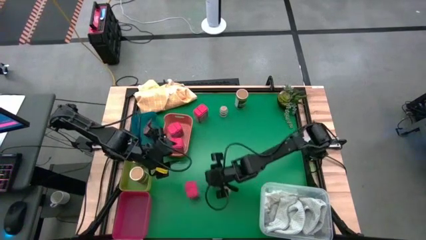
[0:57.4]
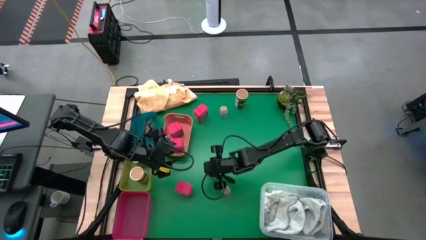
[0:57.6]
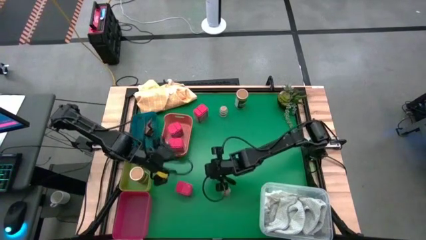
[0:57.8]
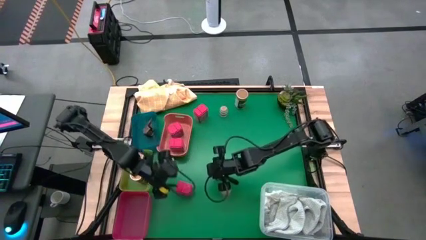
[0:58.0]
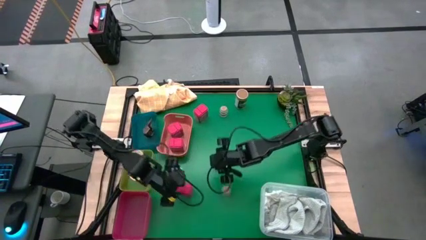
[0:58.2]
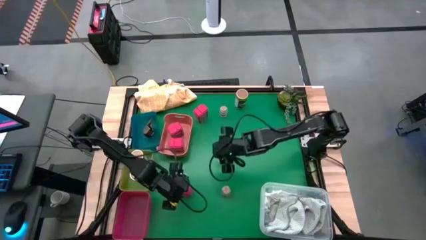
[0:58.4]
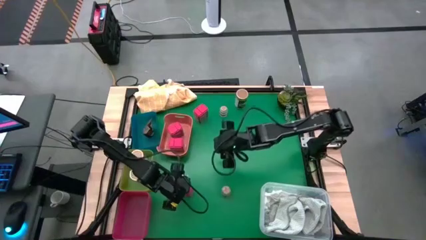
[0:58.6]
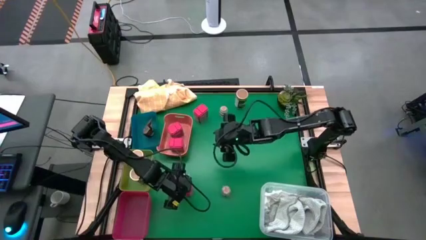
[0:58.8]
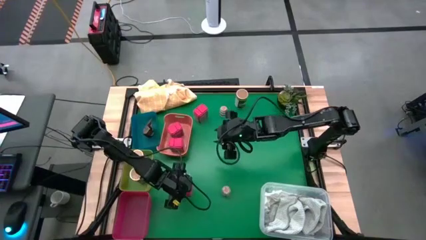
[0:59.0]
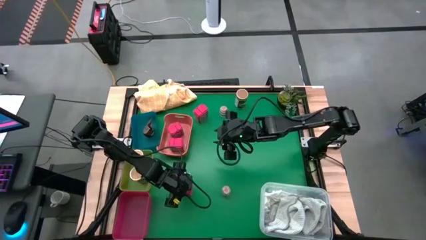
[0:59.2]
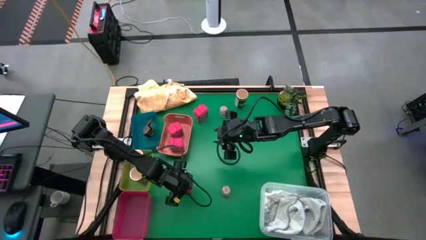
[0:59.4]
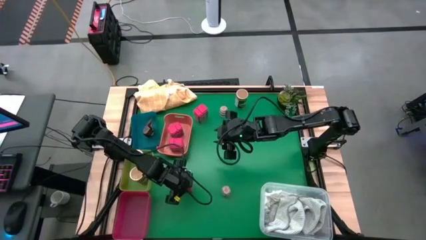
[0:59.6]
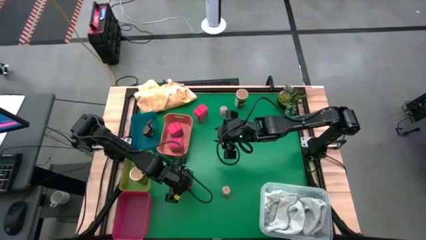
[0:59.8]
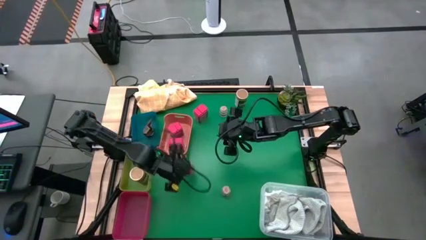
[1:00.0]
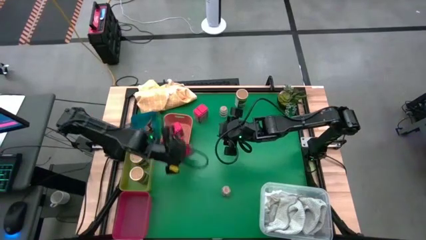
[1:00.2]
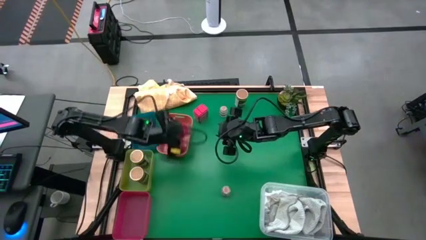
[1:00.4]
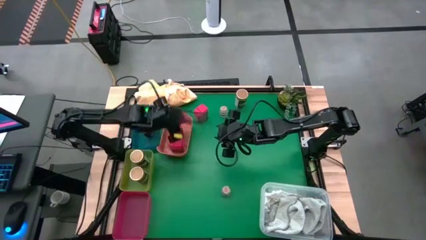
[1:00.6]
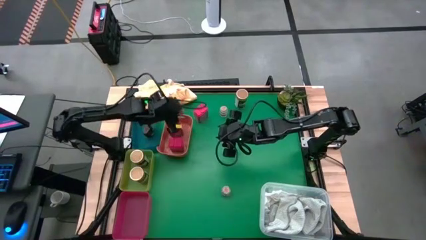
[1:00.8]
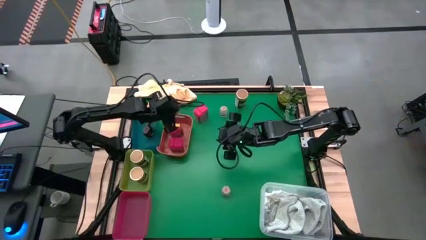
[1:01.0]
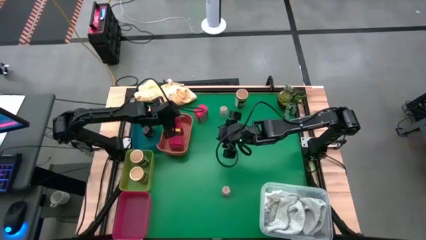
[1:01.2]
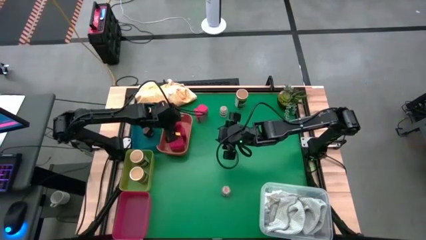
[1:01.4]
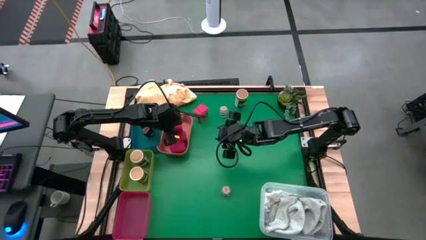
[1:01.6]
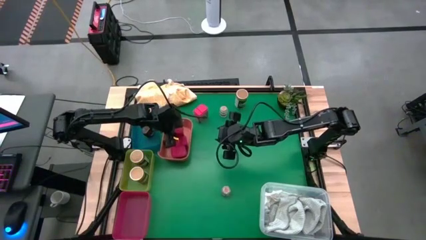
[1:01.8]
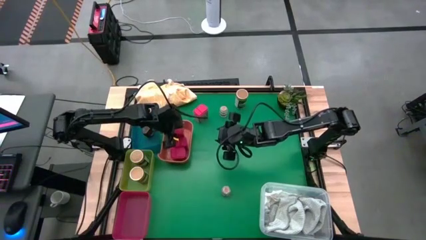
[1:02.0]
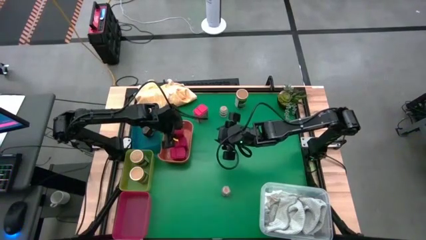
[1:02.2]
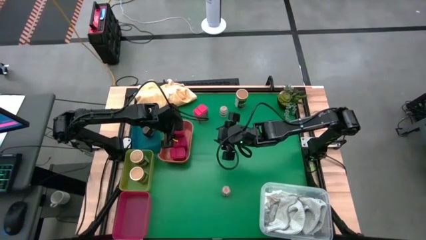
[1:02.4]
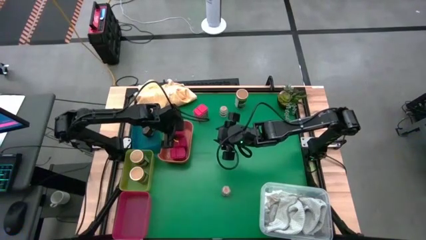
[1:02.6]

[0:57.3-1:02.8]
Task: Sort spices by type
Put the bottom red seasoning can into the orange bin

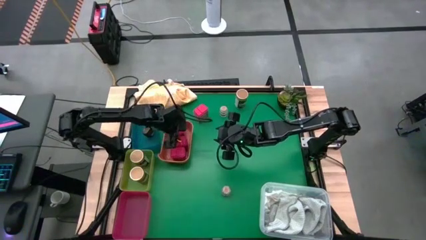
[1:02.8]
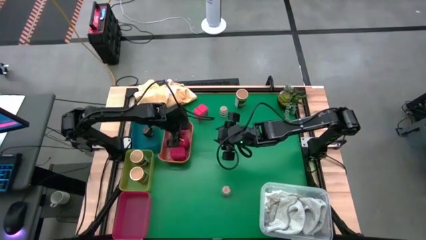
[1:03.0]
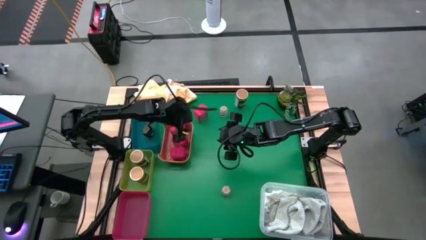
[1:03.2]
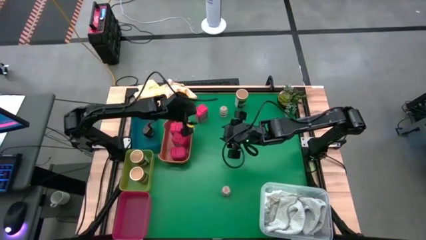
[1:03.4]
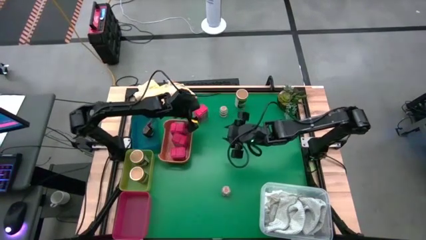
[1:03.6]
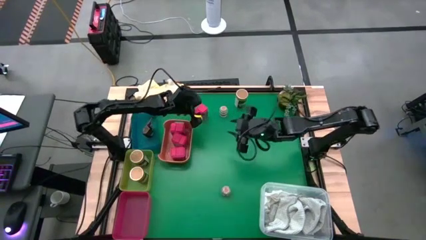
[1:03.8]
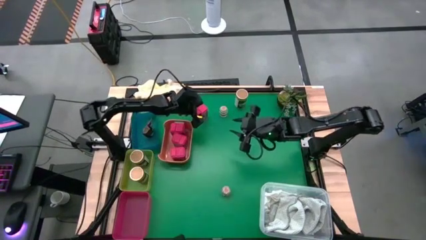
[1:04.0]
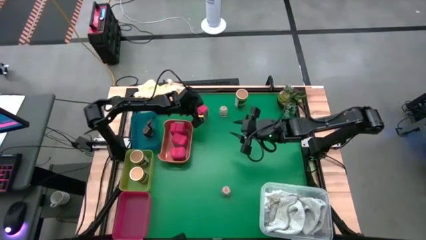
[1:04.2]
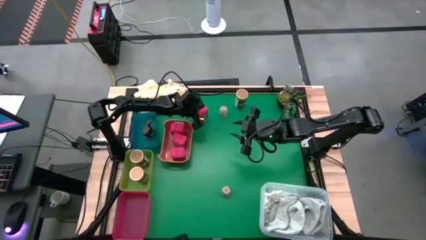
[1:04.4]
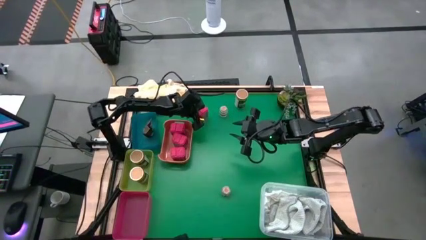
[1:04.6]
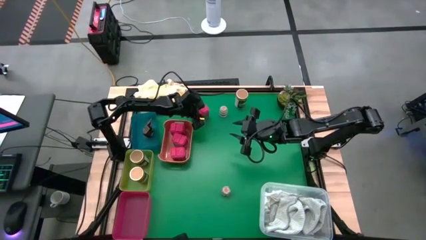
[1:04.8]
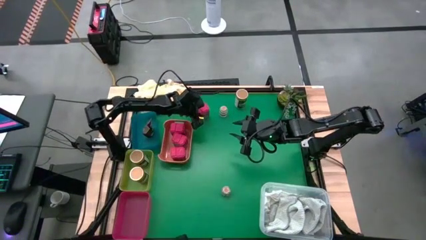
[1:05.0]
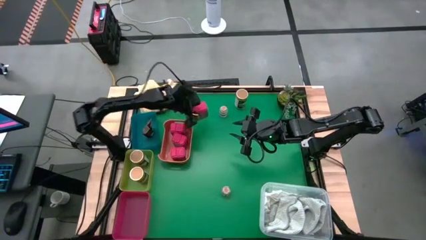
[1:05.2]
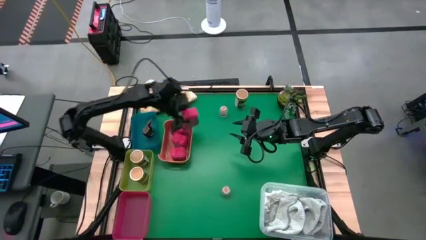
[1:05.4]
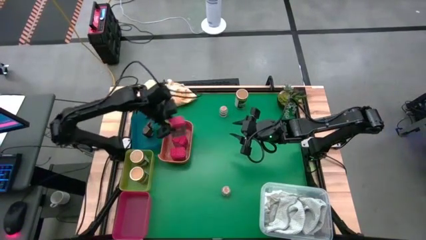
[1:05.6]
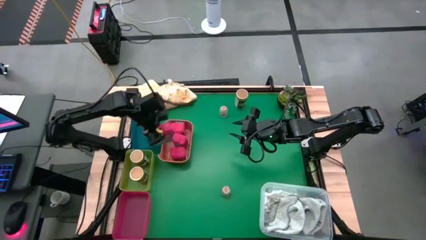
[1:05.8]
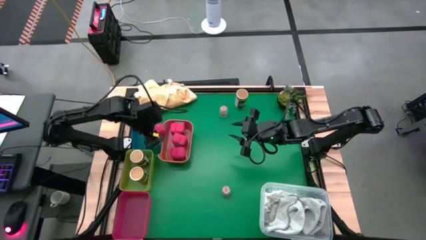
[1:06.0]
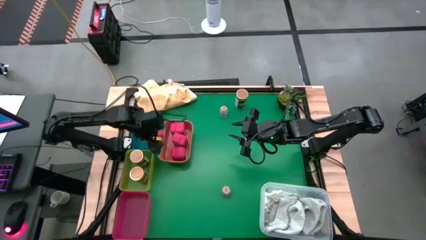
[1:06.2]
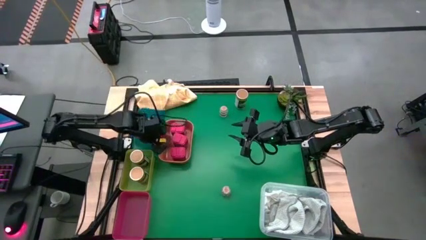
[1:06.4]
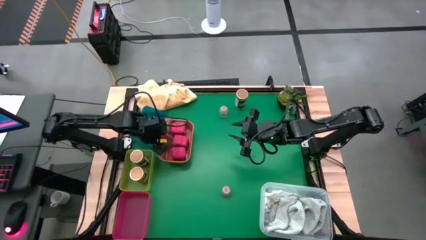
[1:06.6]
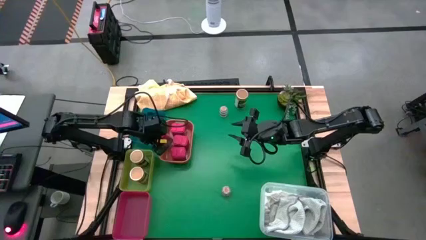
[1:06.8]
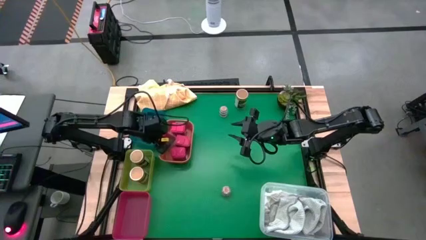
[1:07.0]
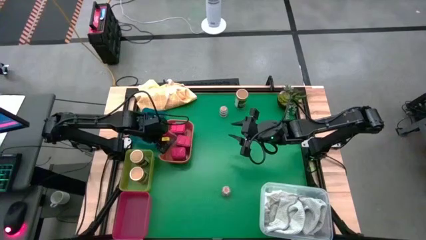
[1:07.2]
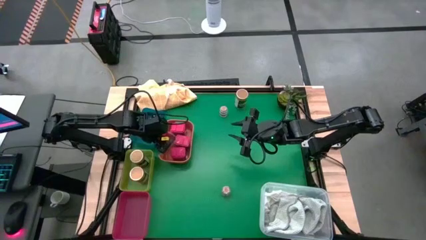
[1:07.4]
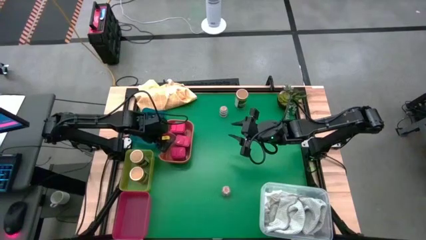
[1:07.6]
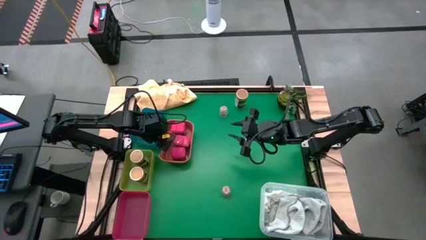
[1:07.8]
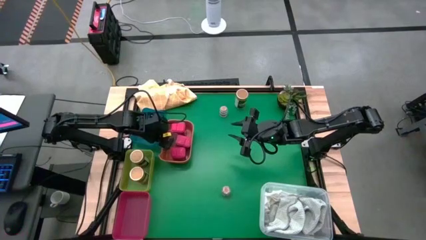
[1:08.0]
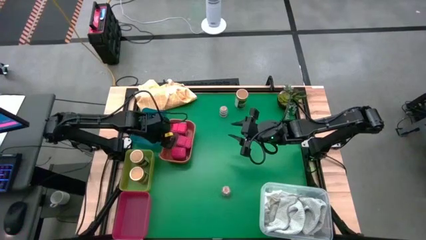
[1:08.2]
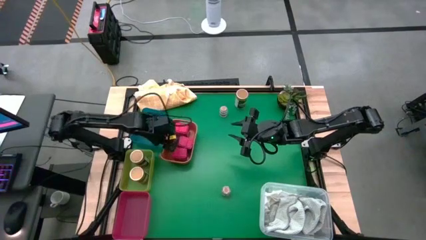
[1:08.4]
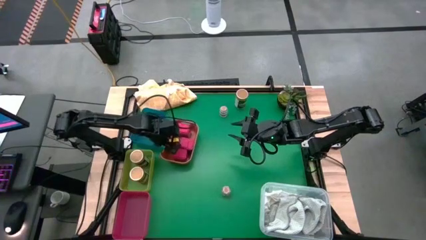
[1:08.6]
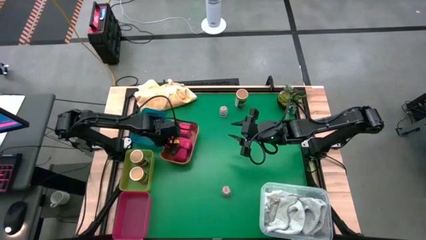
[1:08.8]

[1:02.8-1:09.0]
Put the red seasoning can into the orange bin

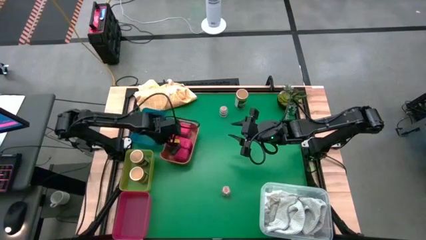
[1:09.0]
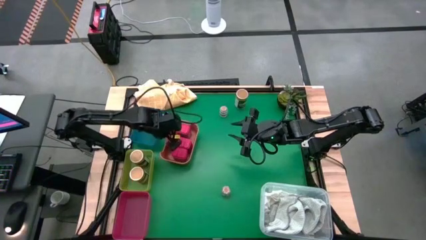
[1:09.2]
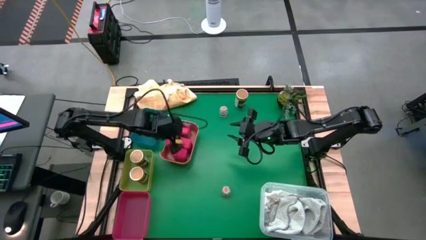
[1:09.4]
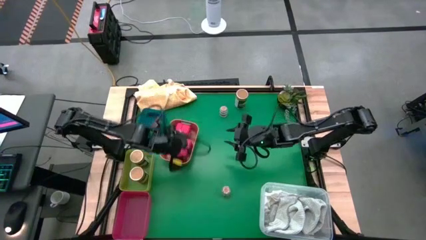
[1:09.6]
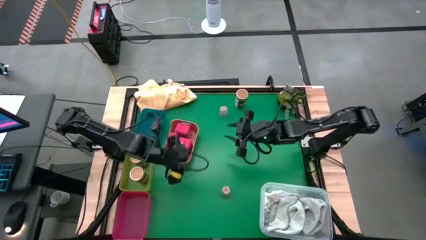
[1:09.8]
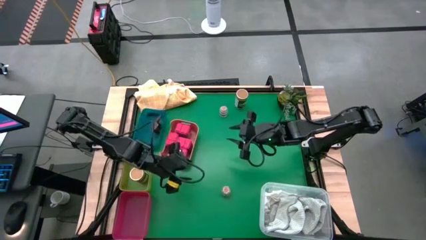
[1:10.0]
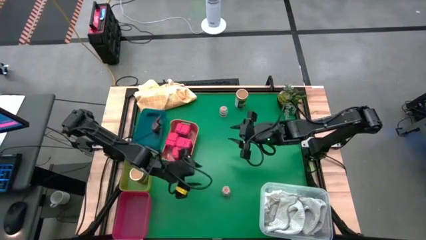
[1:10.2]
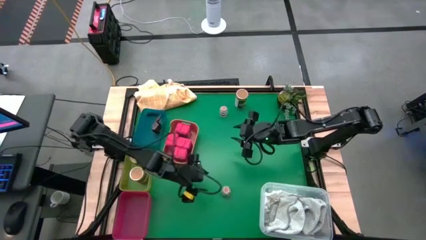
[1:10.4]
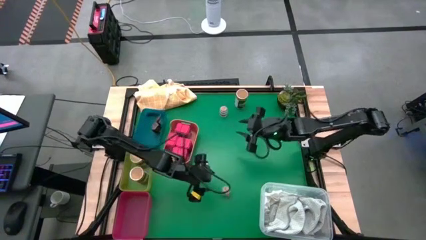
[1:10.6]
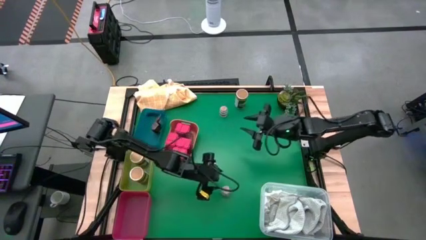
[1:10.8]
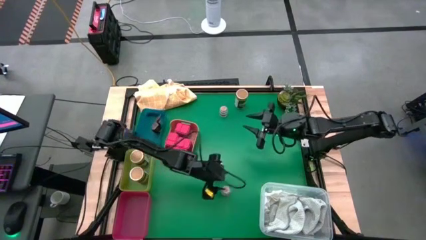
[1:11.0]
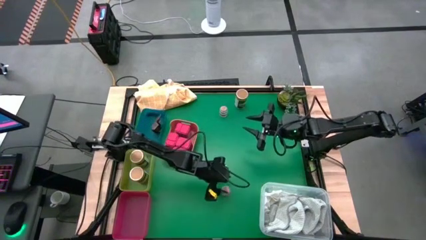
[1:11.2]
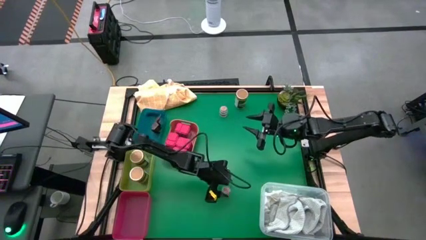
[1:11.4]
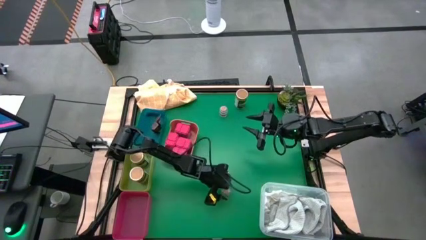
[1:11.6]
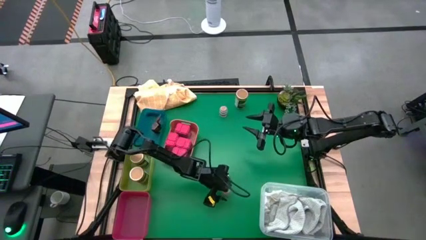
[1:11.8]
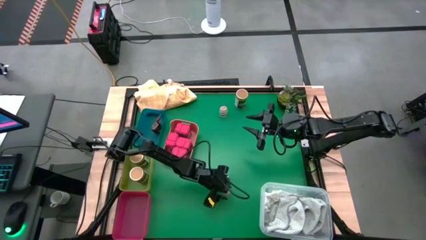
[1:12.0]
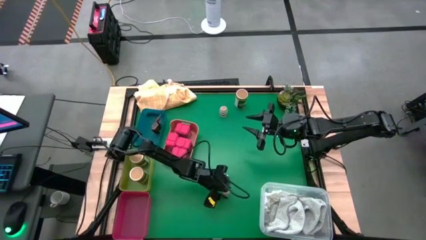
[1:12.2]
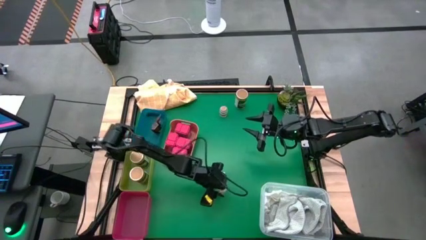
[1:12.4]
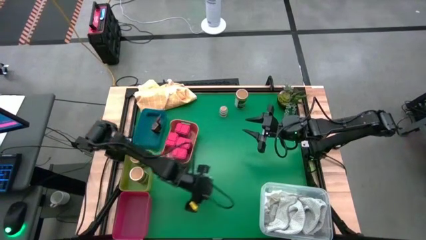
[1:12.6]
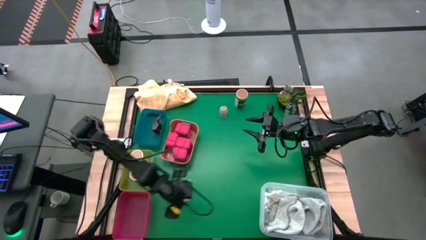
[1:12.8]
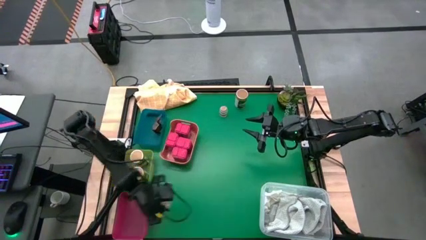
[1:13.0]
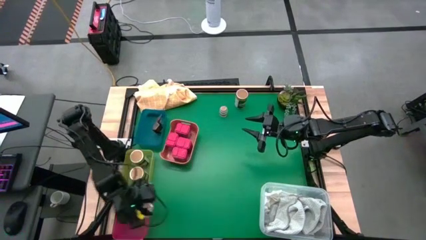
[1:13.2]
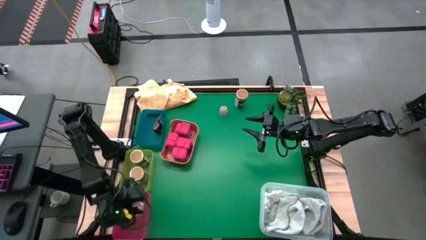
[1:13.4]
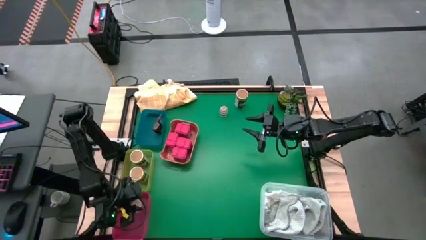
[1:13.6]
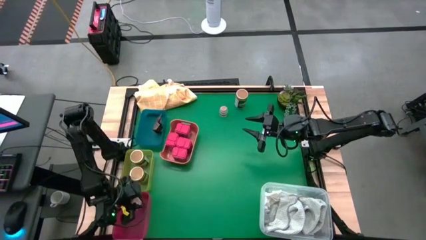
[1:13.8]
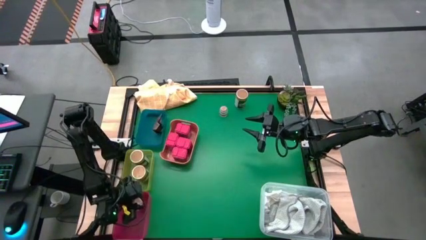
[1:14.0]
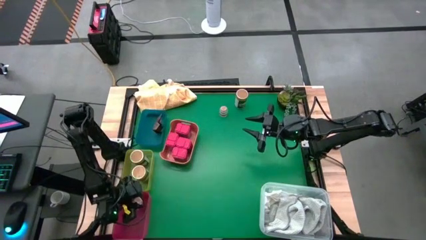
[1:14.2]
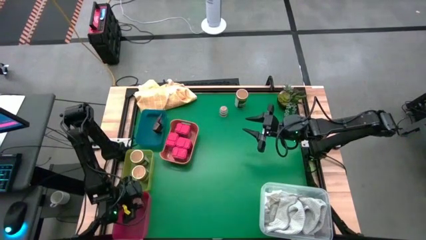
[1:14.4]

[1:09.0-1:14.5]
Put the bottom seasoning bottle into the red bin
